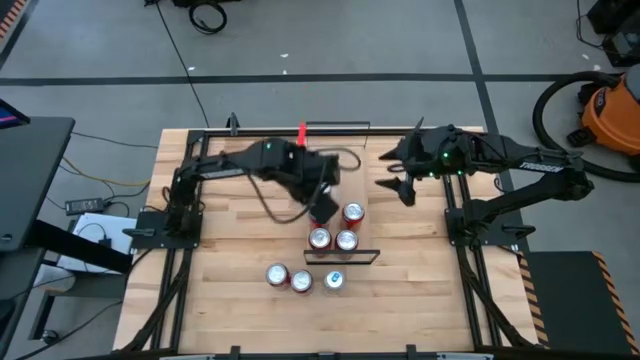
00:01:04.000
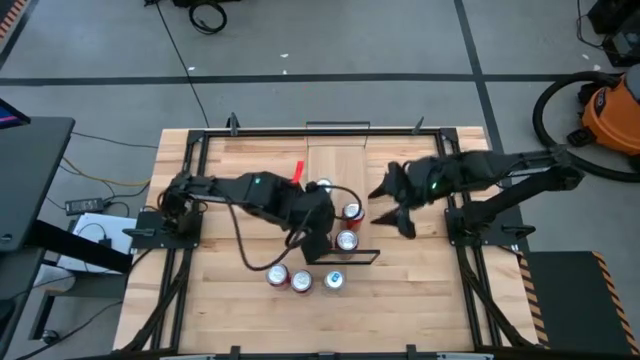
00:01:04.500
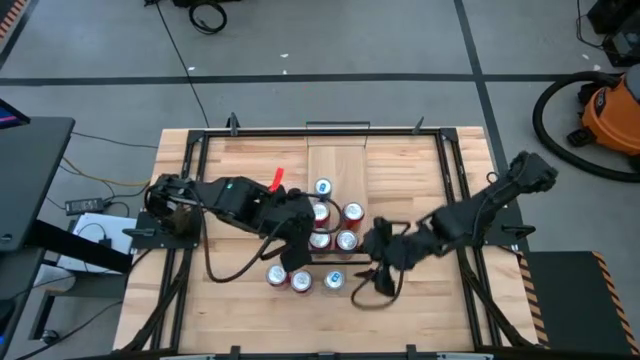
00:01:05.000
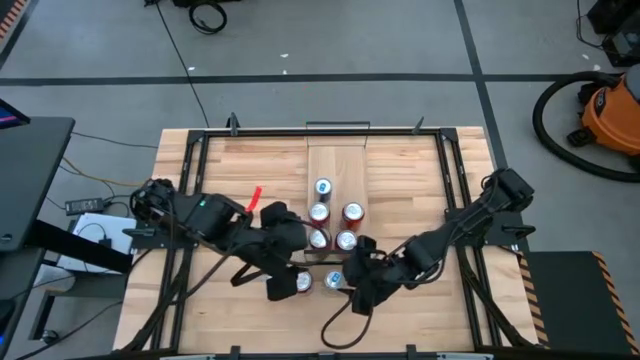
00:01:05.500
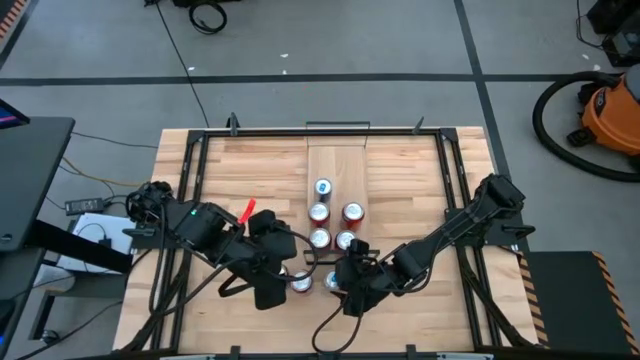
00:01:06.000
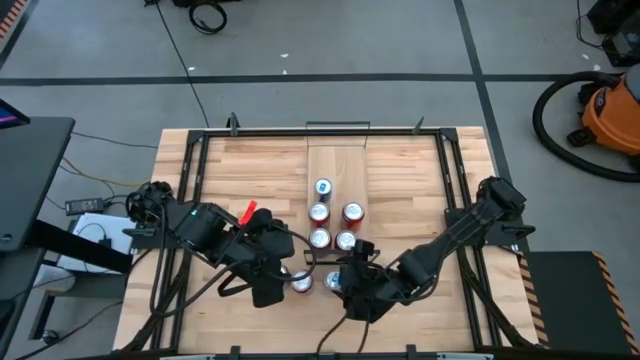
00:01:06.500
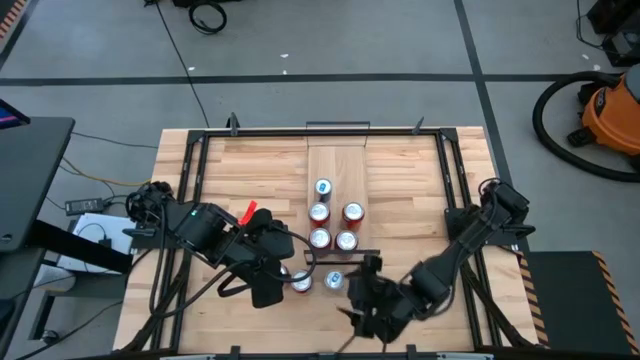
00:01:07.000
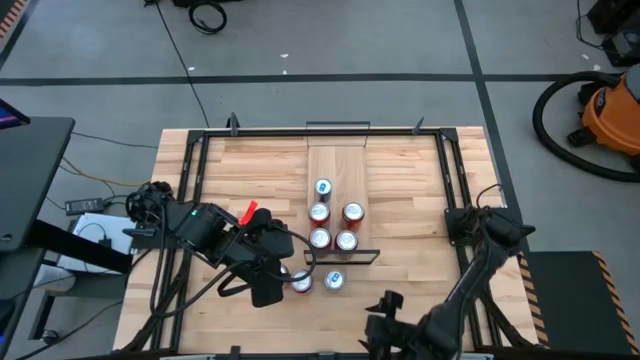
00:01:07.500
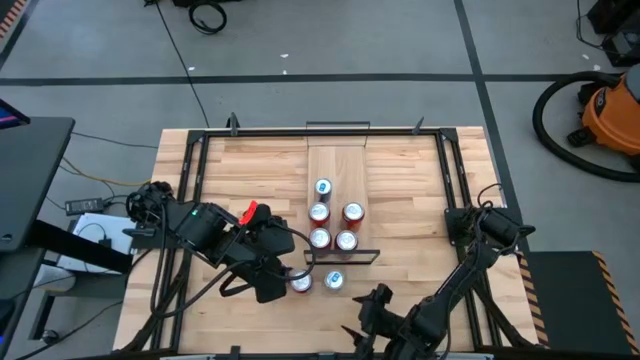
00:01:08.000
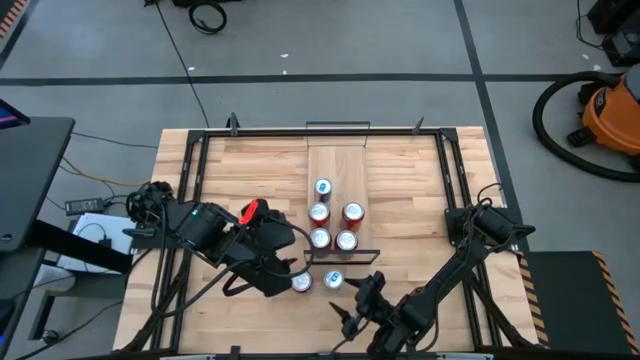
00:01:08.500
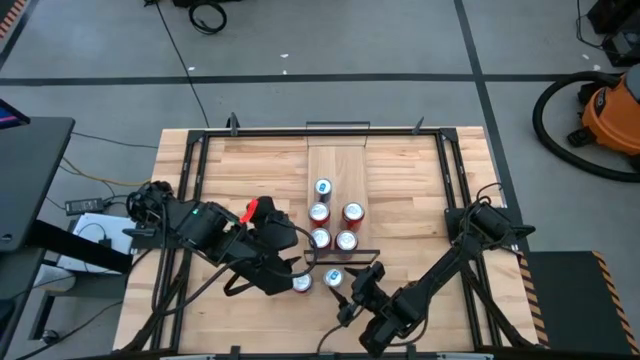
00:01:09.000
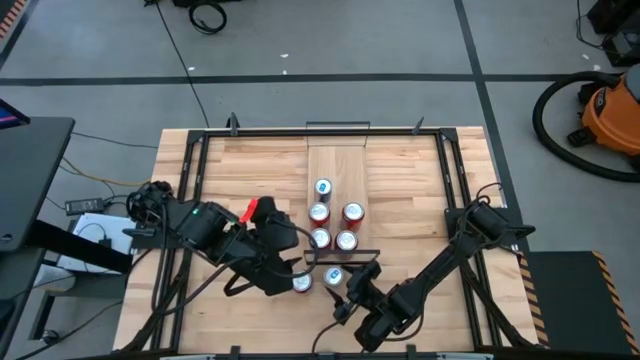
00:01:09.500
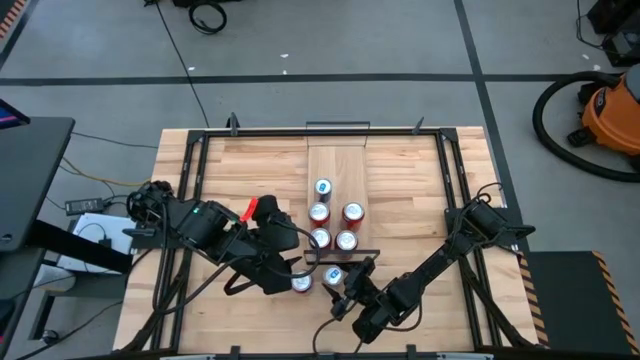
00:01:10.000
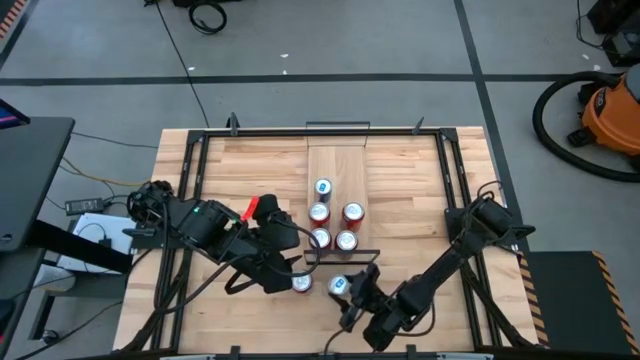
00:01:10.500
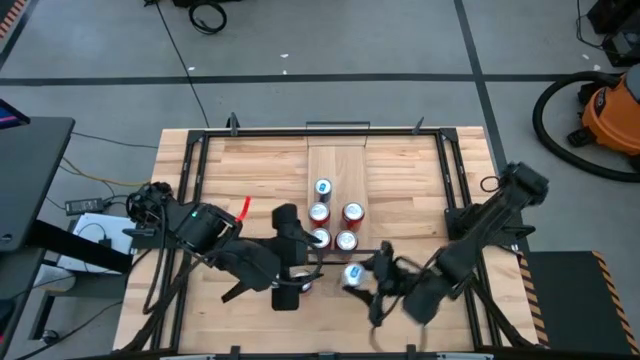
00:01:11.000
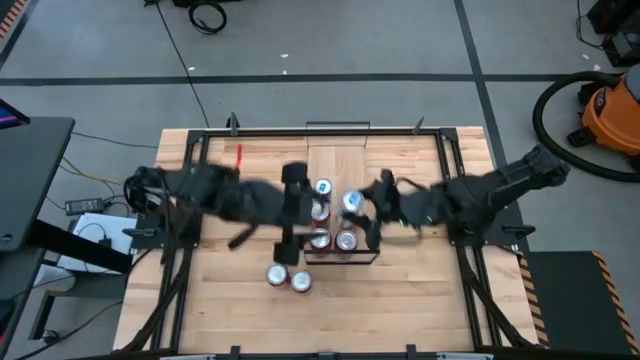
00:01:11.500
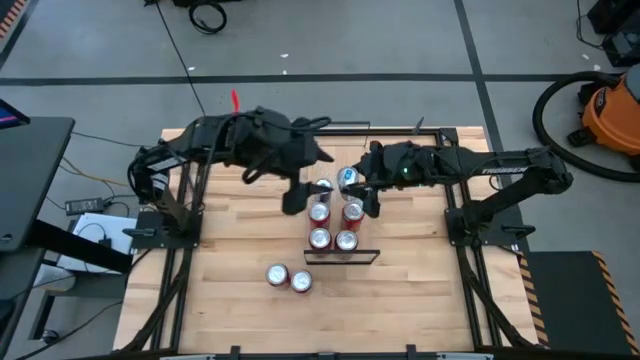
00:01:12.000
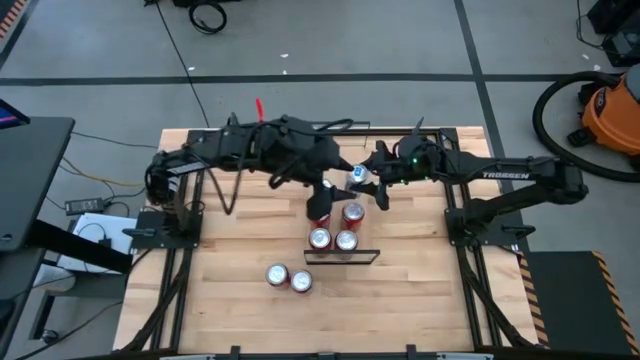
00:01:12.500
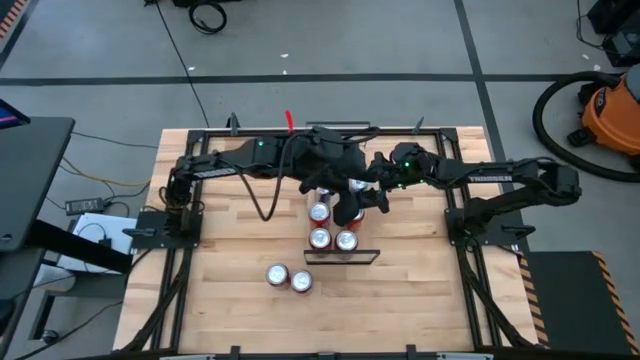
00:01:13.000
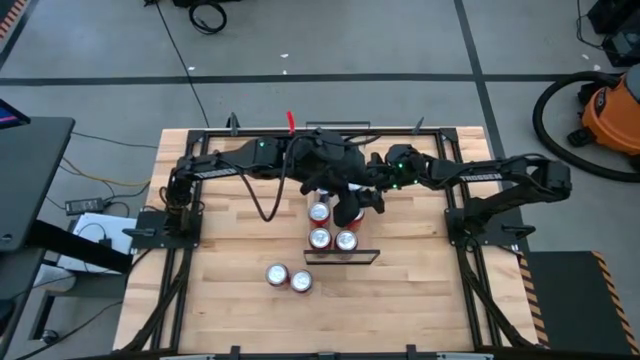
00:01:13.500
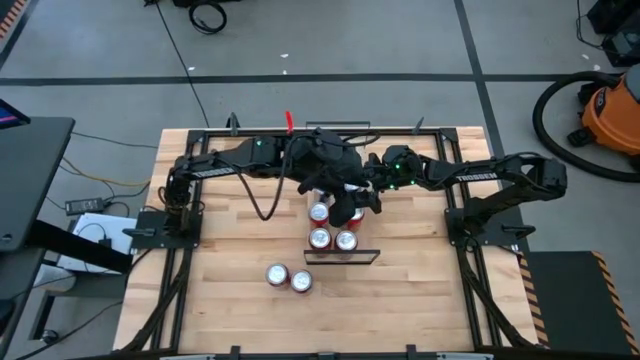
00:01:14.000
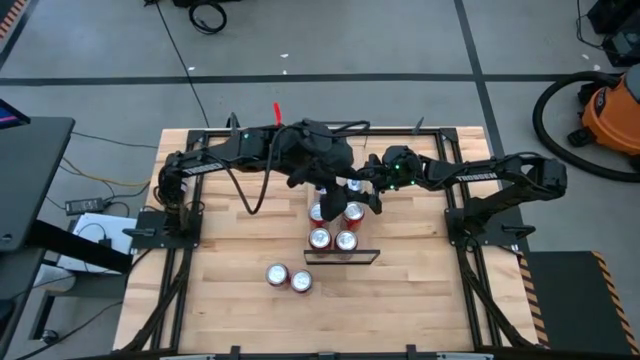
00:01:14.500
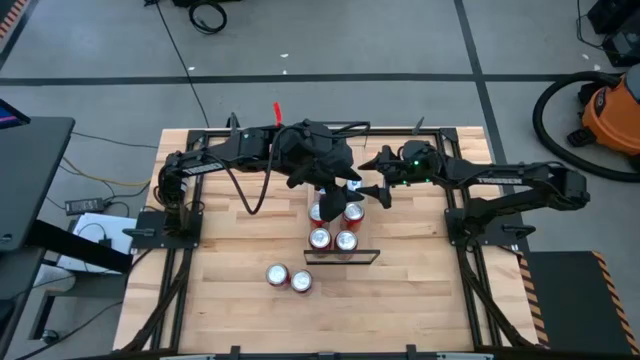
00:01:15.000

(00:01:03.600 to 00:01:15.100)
Task: Place canned beverage on shelf
Put the blue soda can on the shelf aligned with the other blue soda can

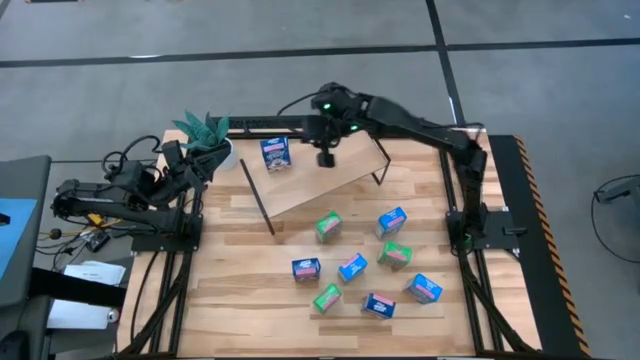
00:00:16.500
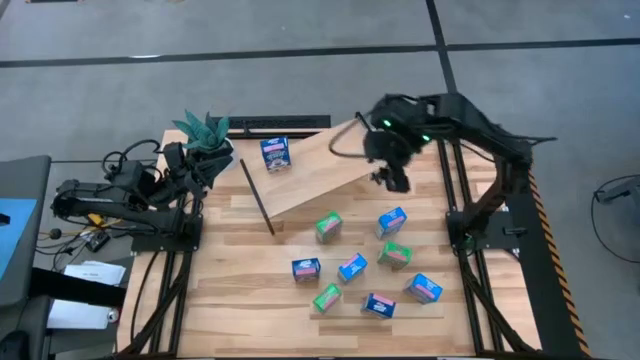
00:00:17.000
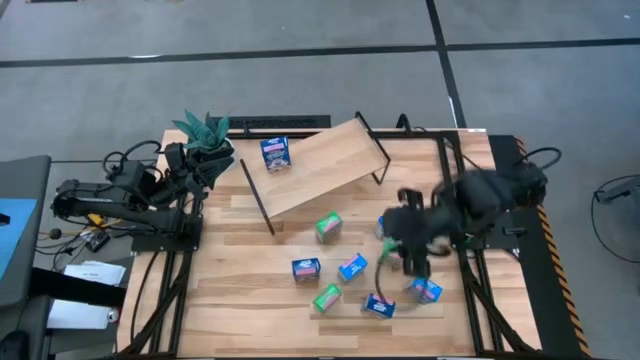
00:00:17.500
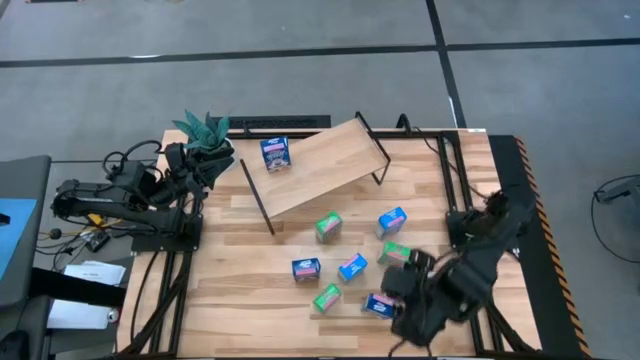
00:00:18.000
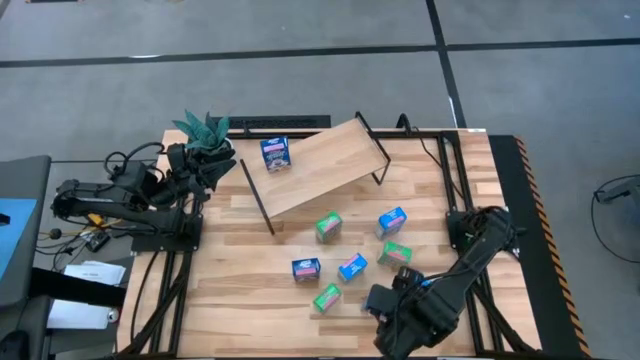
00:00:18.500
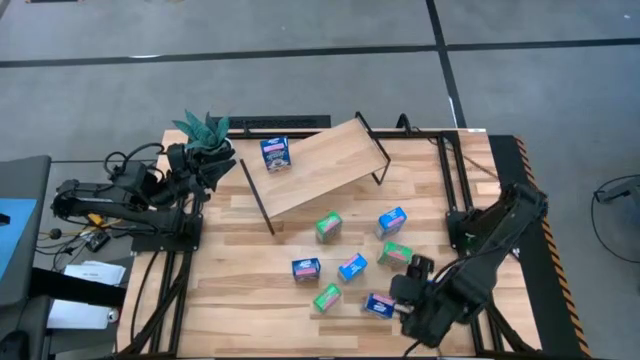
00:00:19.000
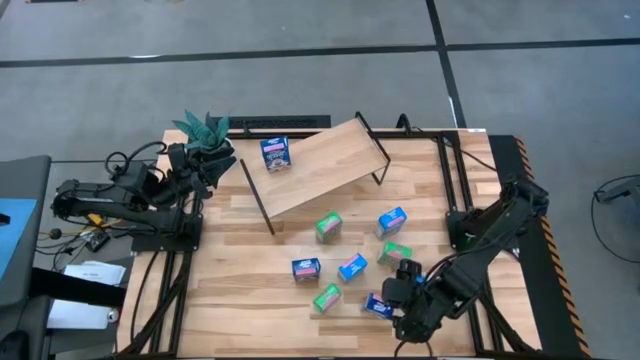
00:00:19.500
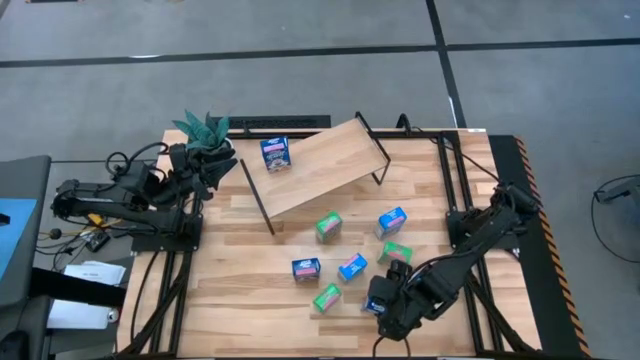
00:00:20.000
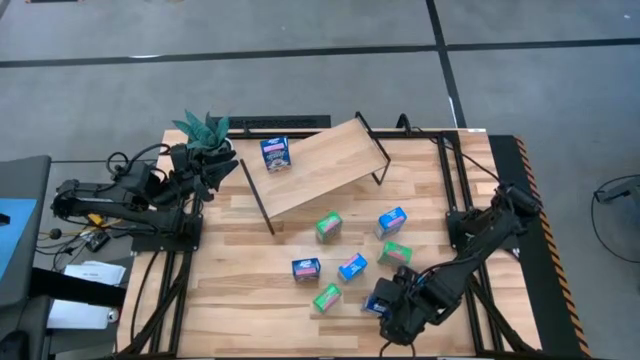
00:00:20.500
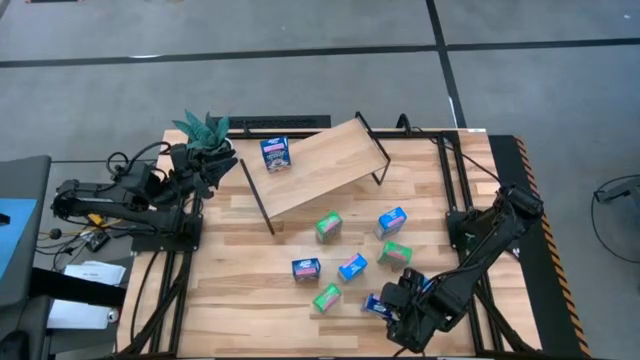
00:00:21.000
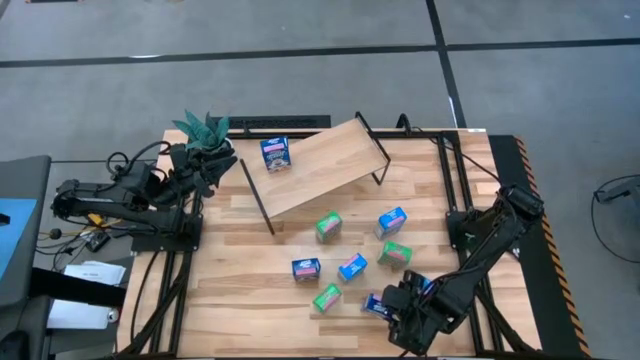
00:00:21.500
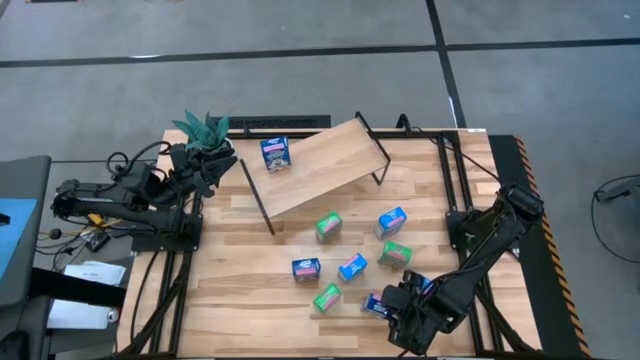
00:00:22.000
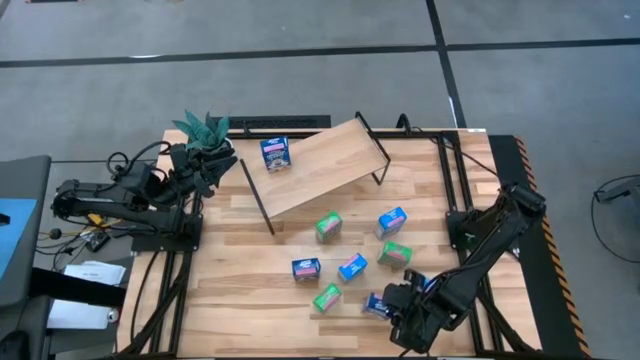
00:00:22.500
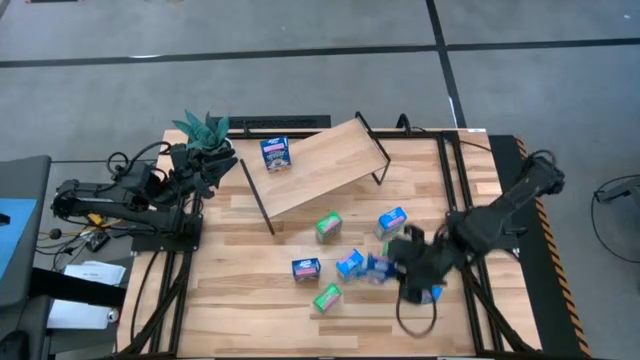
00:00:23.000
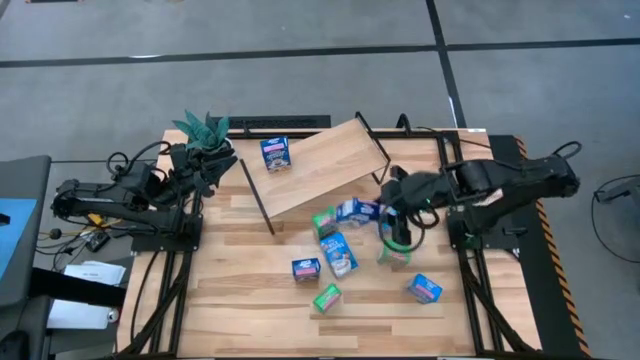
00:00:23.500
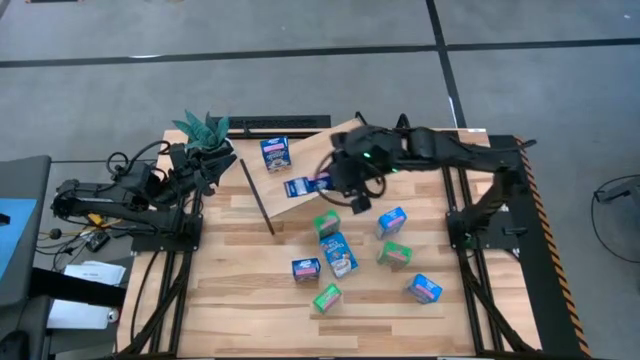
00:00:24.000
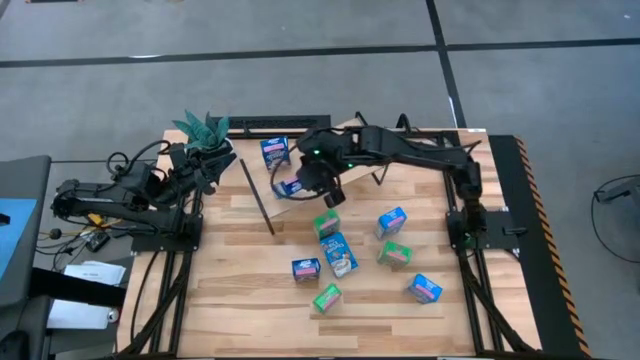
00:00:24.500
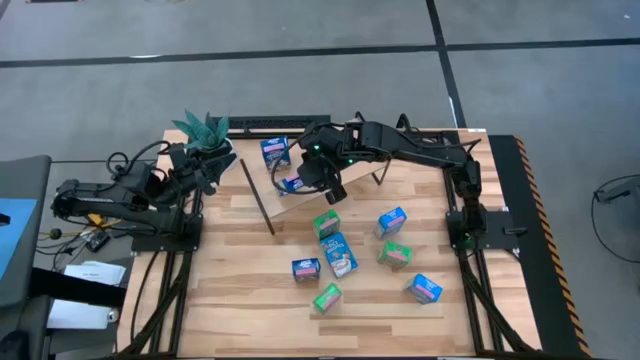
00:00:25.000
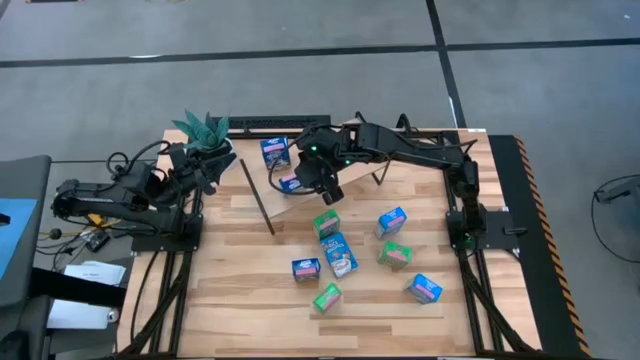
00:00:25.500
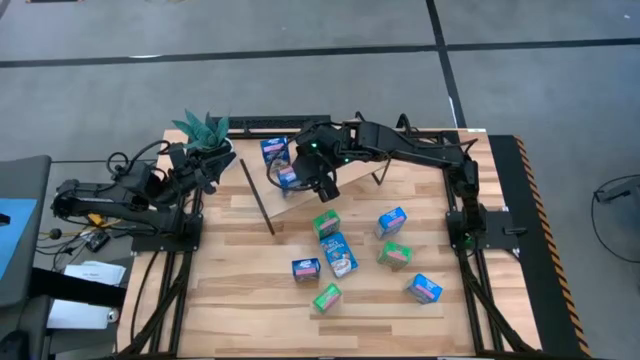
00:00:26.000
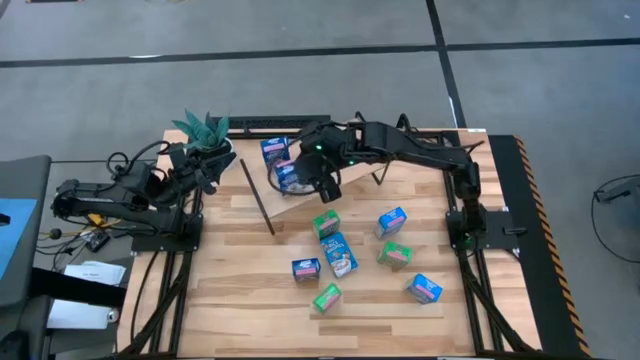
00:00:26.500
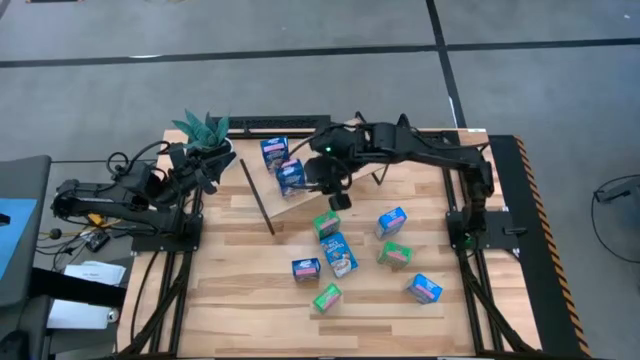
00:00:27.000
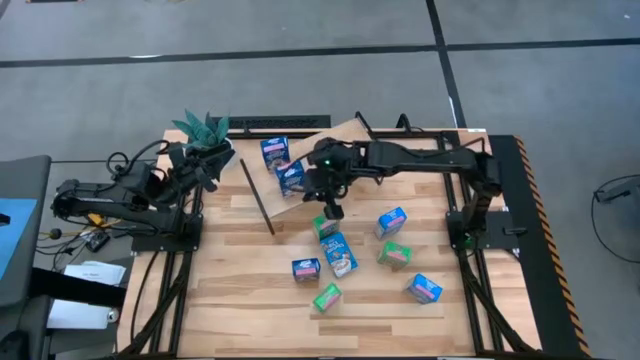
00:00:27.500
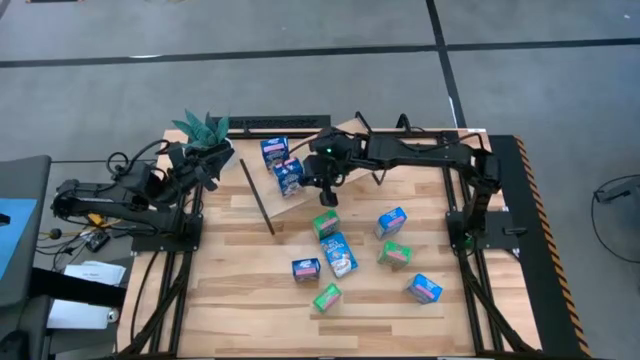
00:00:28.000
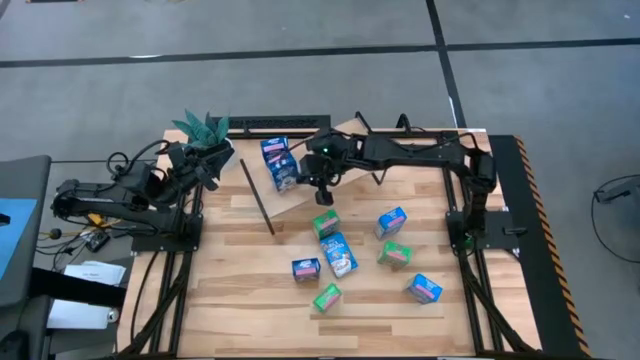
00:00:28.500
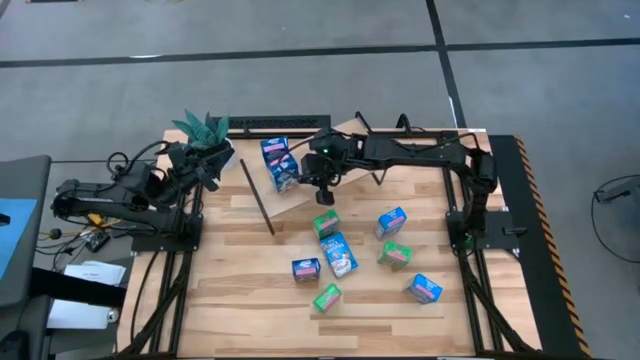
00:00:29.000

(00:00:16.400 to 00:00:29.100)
Task: Stack cereal on shelf
Put the right blue cereal box on the shelf and align it with the other blue cereal box
